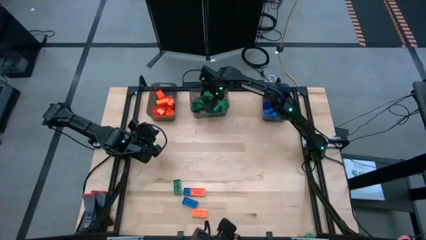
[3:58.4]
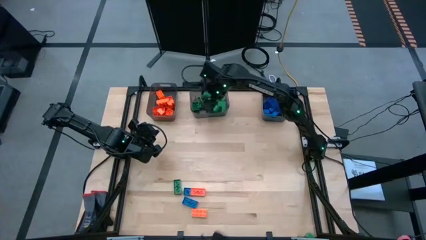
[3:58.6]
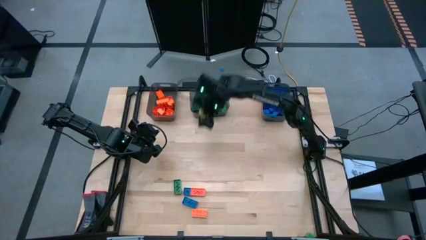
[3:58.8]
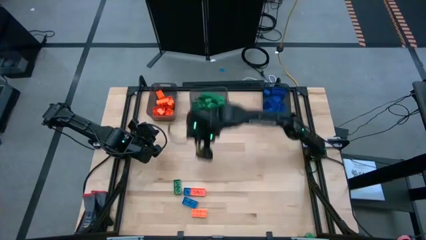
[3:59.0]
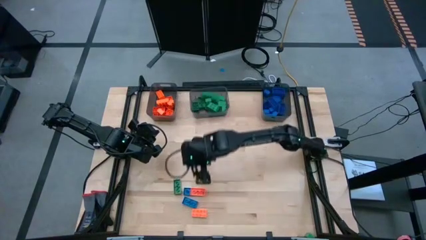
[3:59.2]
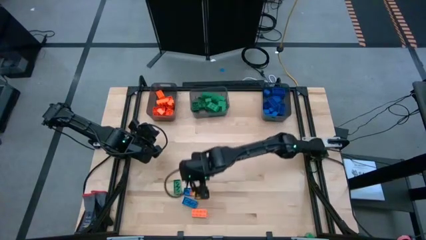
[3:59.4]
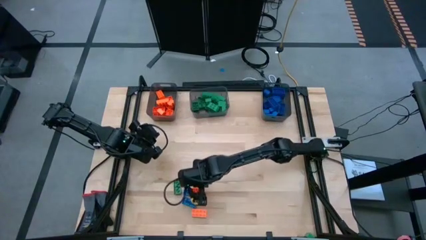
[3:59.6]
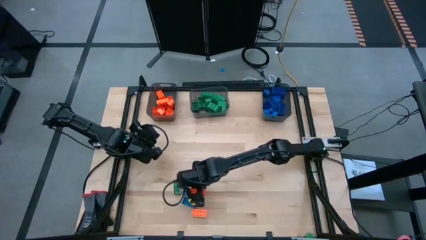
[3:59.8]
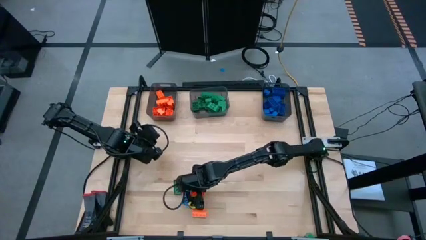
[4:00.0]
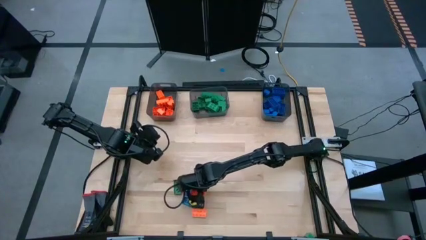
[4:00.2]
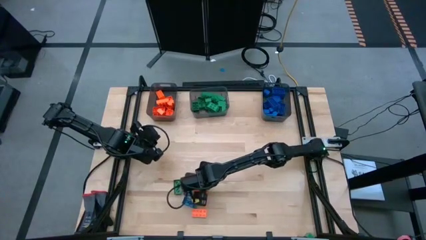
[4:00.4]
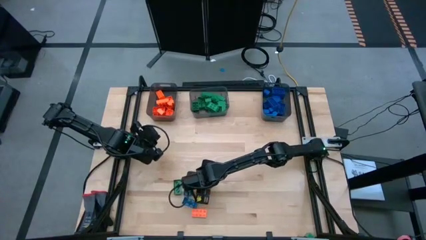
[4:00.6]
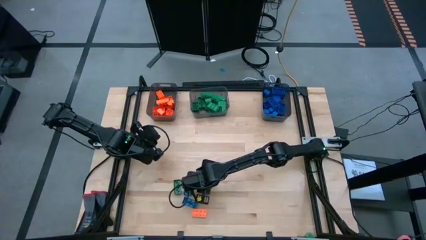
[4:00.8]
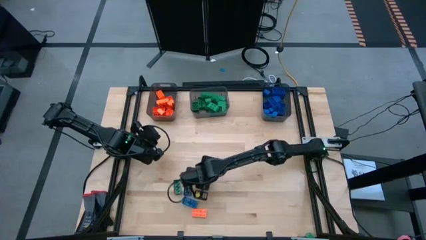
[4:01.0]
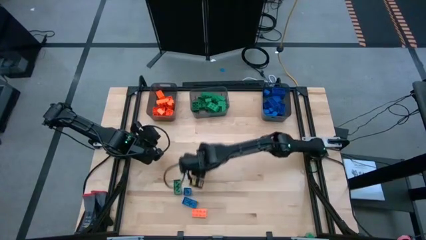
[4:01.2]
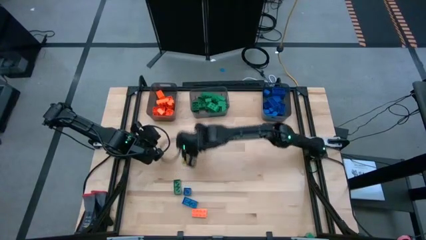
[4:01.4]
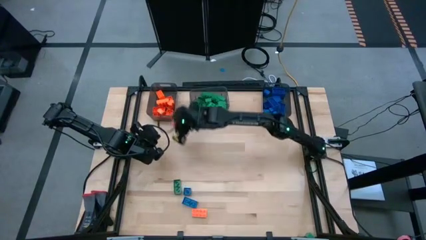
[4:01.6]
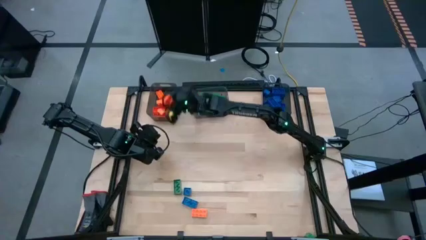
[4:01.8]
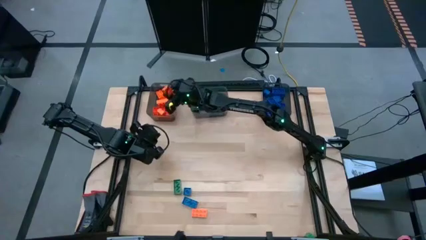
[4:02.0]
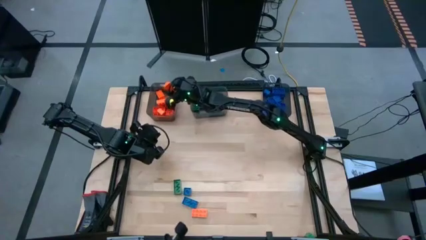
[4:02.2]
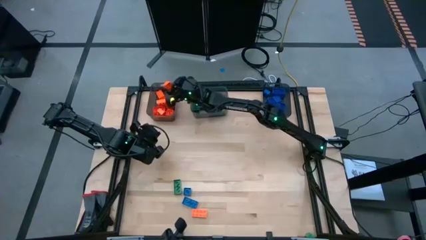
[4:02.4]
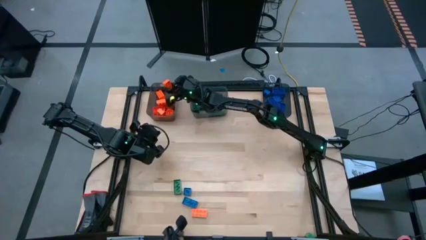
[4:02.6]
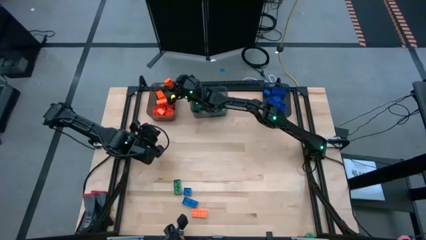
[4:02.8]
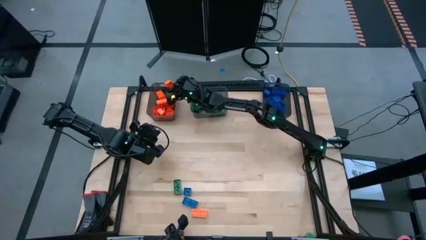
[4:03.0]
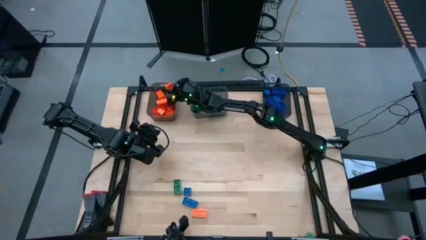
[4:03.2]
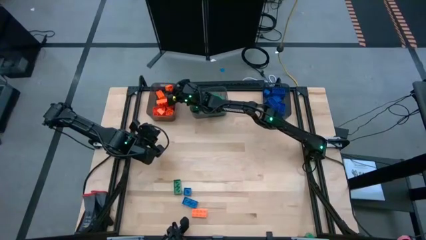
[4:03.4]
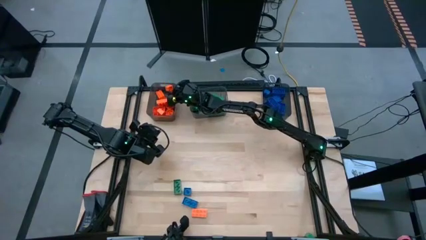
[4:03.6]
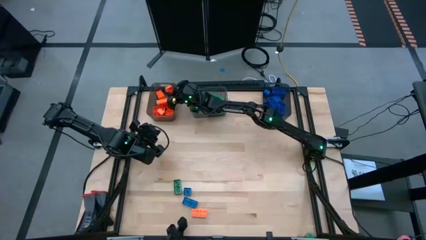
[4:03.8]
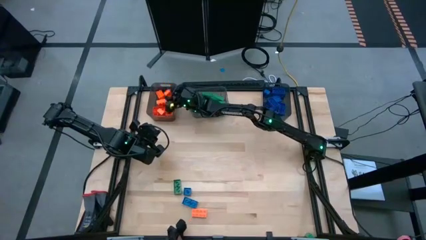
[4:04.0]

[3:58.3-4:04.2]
Task: Sort blocks
Put the orange game piece into the left black bin

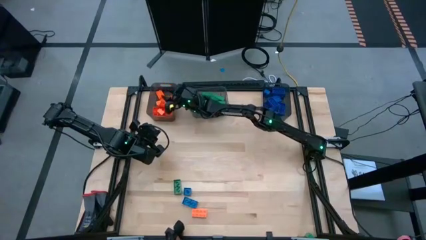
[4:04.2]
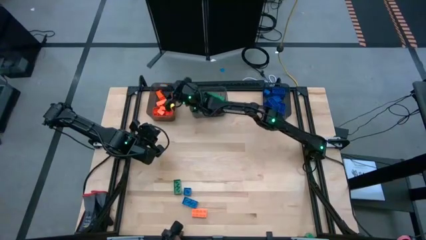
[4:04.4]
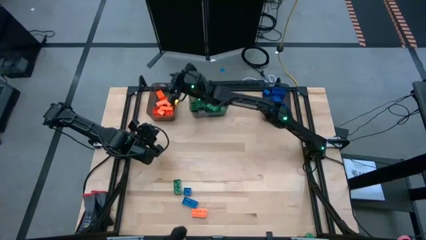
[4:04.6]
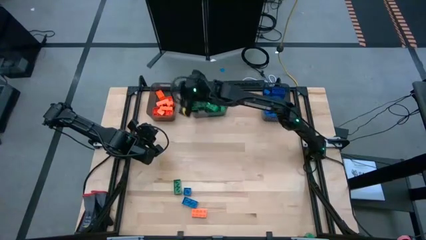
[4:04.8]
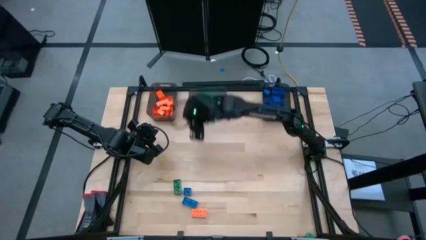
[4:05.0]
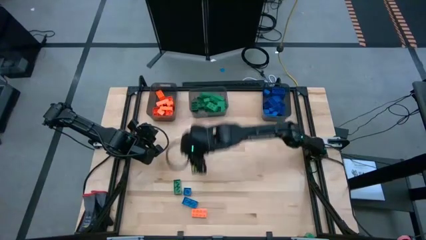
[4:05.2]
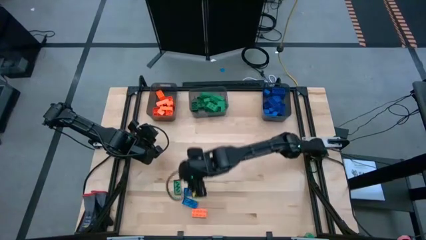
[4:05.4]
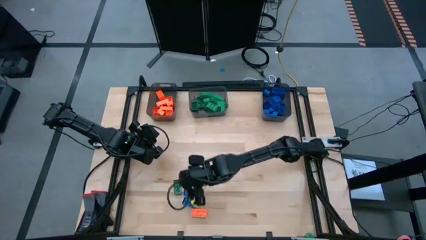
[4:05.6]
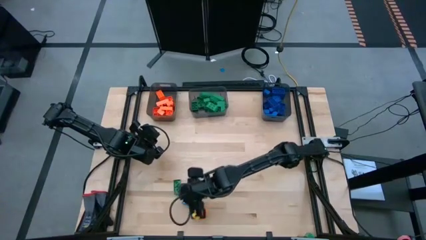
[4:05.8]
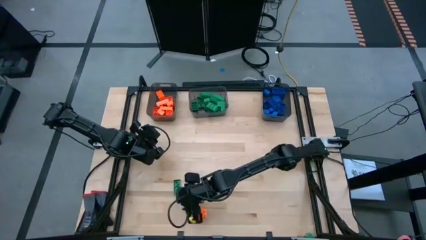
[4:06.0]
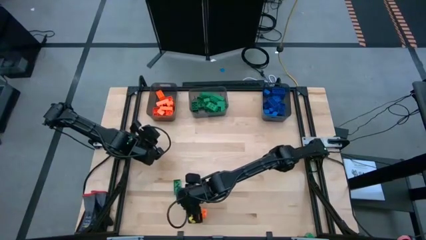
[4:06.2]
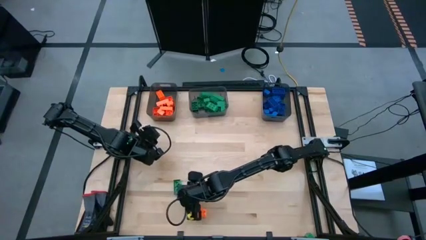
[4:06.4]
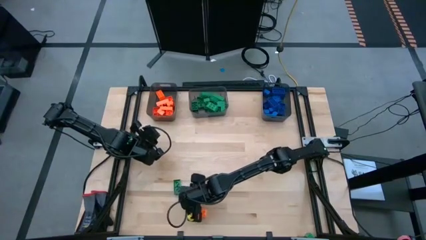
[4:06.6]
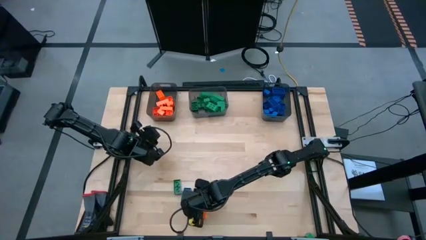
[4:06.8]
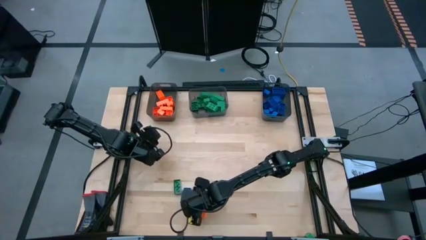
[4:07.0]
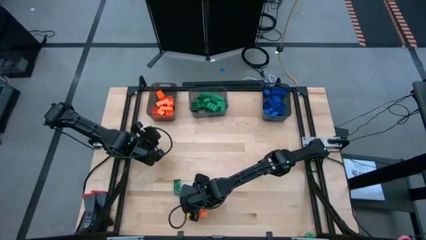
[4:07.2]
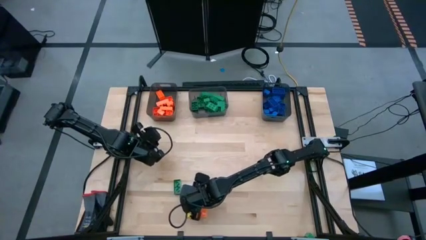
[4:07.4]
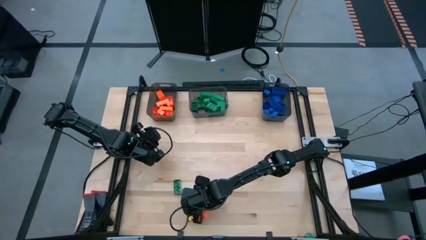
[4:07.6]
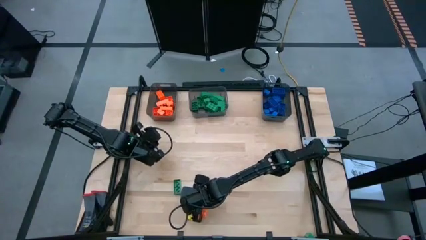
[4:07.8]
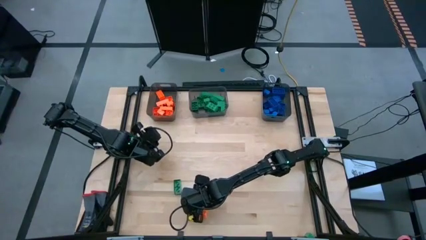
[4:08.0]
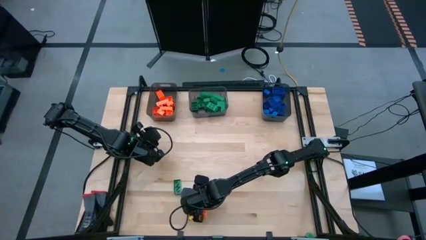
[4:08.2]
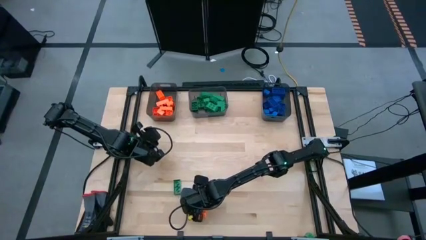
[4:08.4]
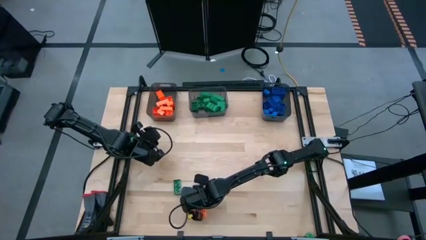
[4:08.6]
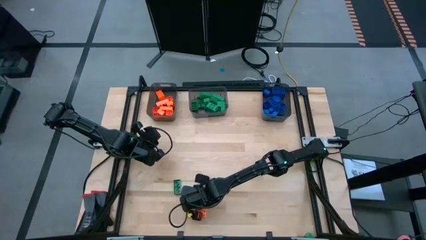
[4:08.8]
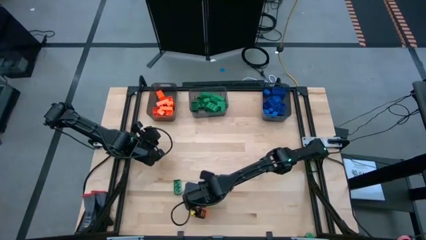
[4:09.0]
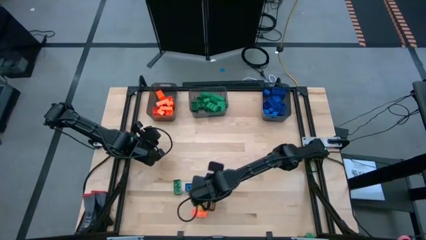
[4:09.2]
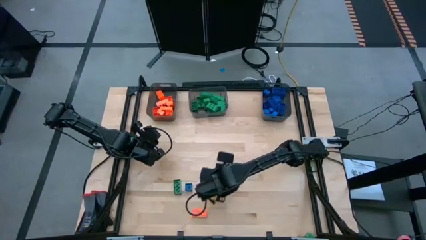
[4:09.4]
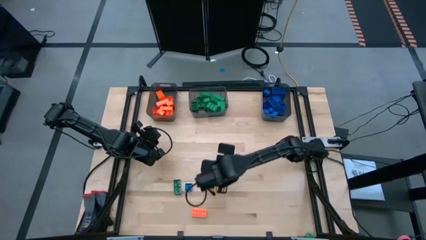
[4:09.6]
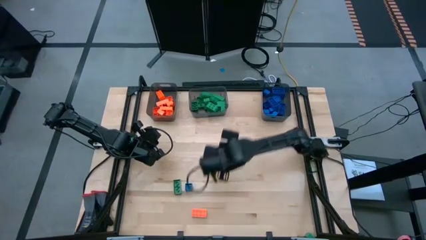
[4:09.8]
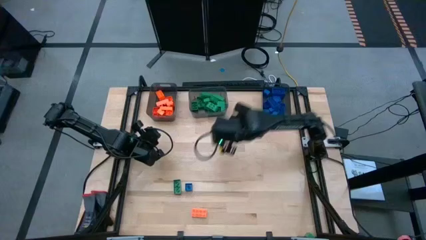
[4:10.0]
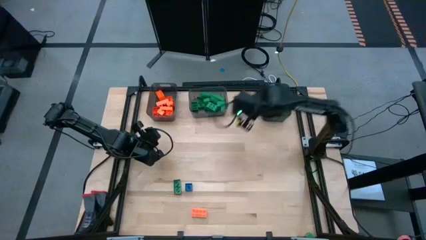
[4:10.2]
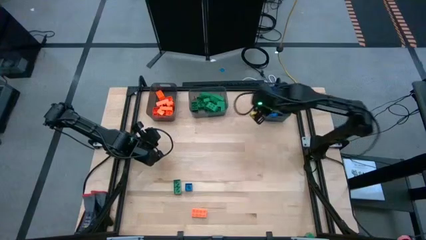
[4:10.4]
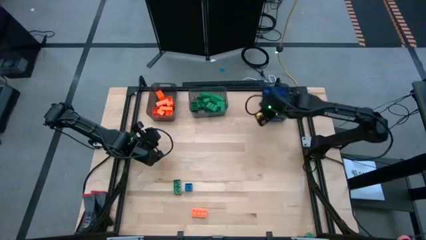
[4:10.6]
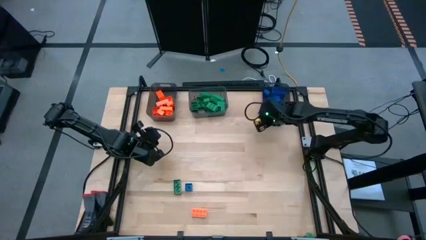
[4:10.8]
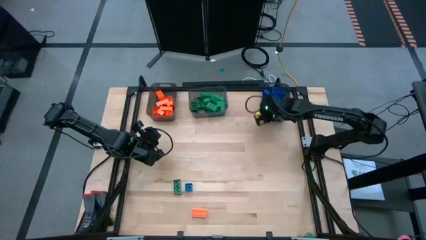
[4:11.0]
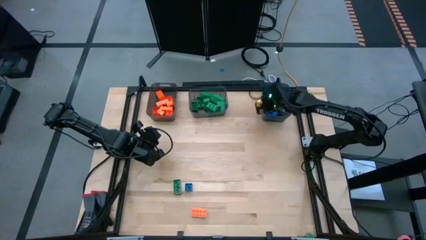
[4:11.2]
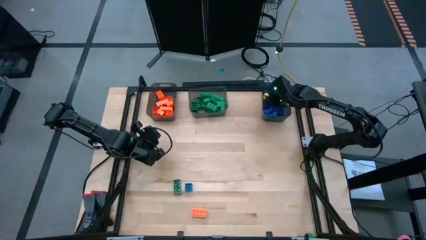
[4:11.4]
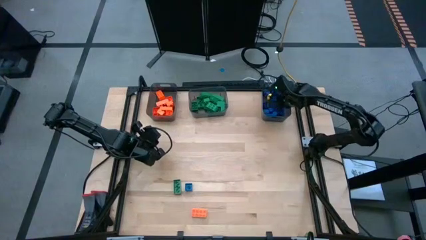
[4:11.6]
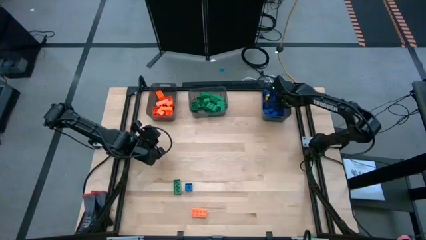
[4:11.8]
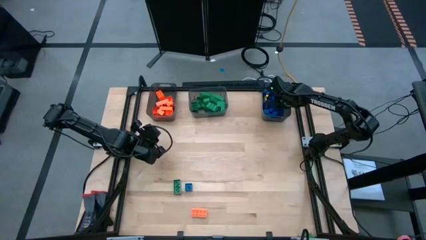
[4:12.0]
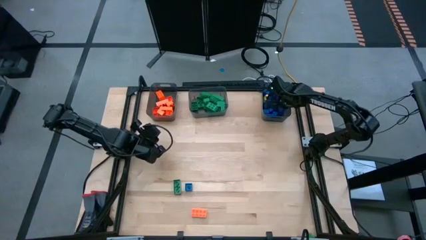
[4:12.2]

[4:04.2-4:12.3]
Put the blue game piece into the right black bin

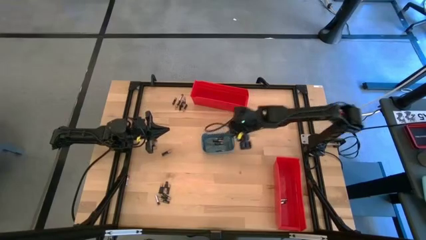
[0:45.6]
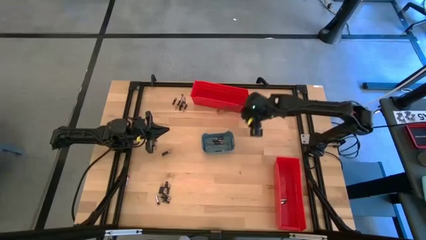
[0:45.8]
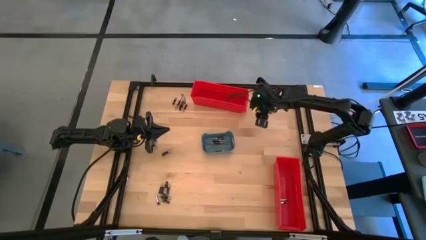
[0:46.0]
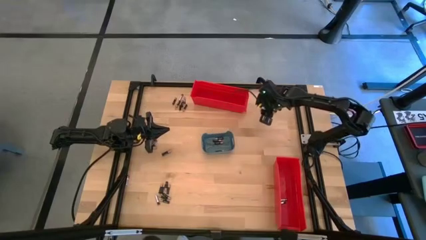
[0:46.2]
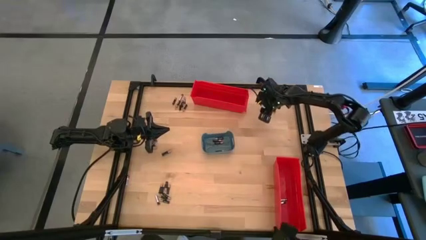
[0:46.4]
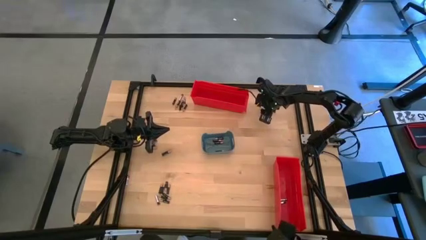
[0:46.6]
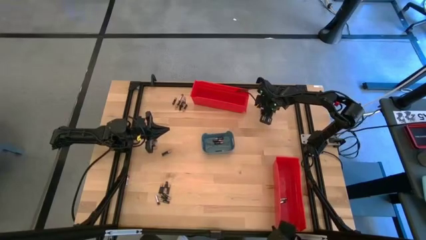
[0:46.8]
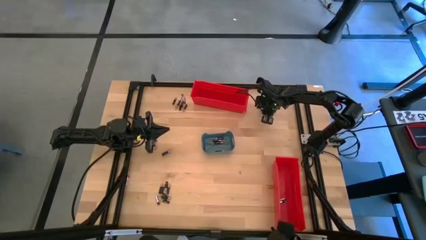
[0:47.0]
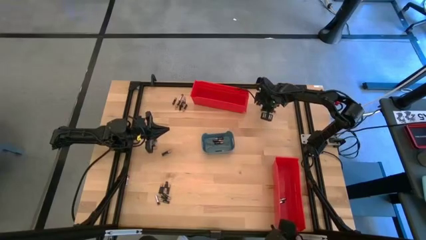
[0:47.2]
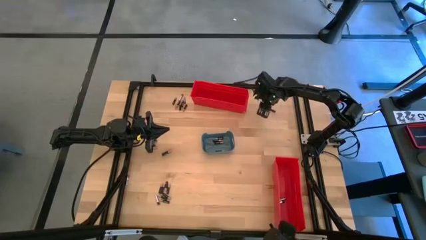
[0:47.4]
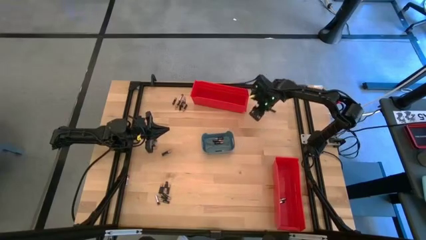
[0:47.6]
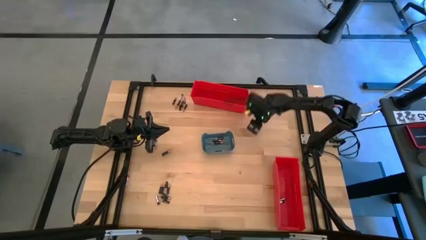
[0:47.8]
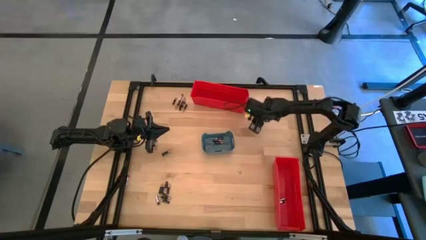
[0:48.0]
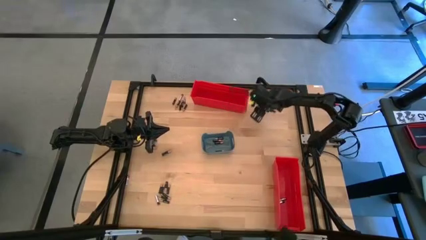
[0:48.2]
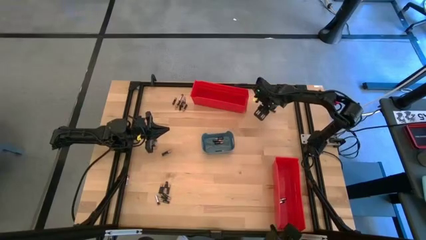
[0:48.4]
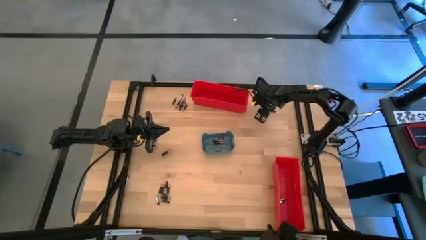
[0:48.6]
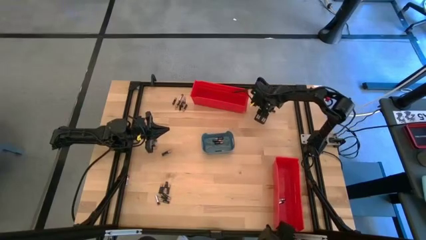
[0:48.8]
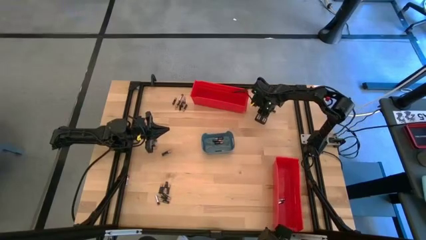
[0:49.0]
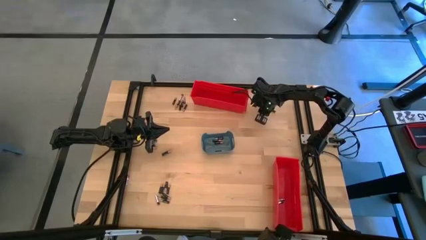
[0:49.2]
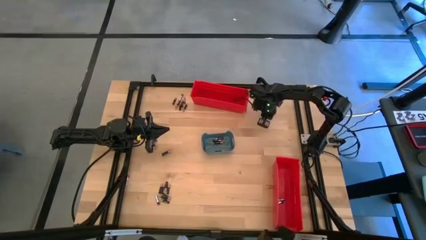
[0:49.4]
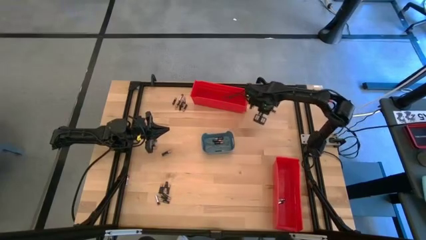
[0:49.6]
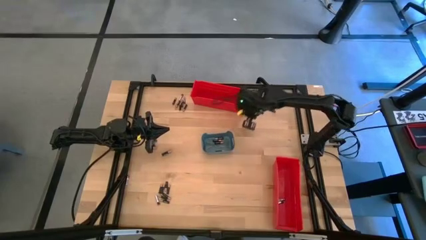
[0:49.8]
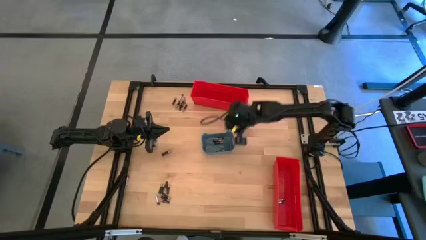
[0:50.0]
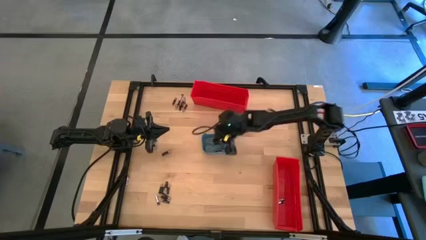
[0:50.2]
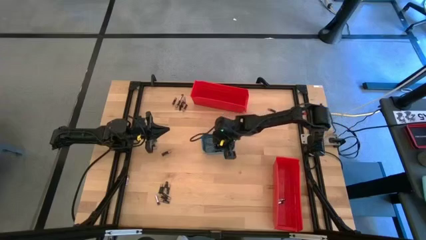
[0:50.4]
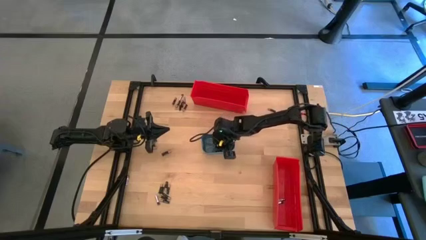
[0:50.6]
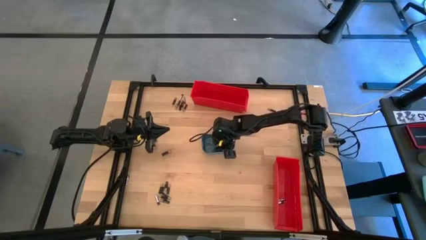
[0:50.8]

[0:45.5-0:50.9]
Task: Sort batteries
Put the black battery into the blue bin
